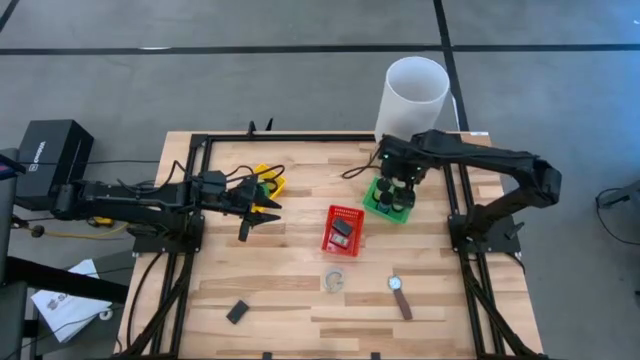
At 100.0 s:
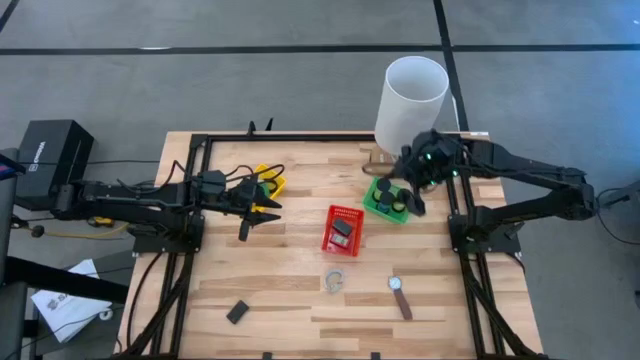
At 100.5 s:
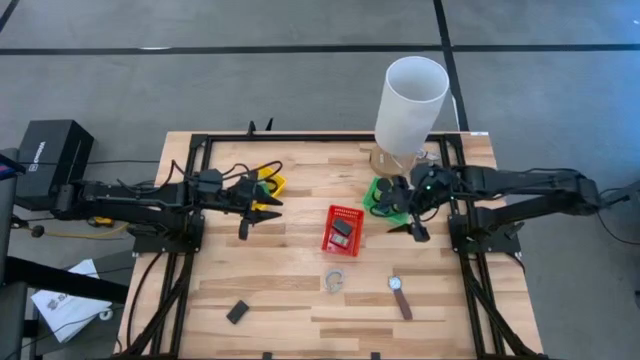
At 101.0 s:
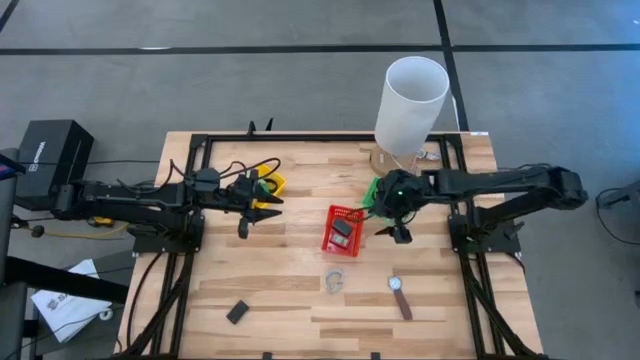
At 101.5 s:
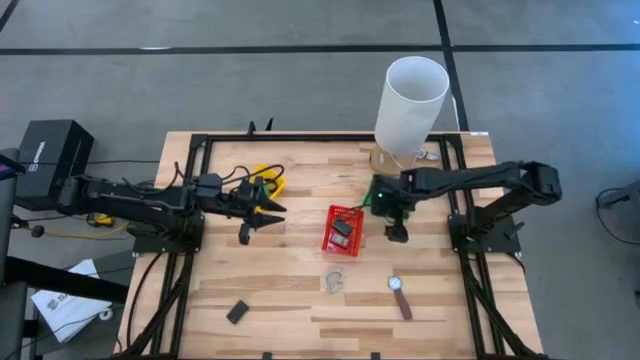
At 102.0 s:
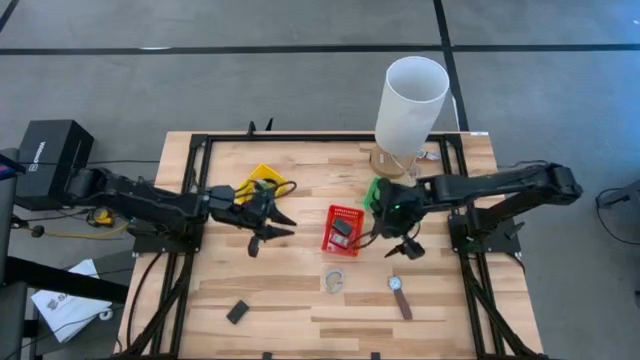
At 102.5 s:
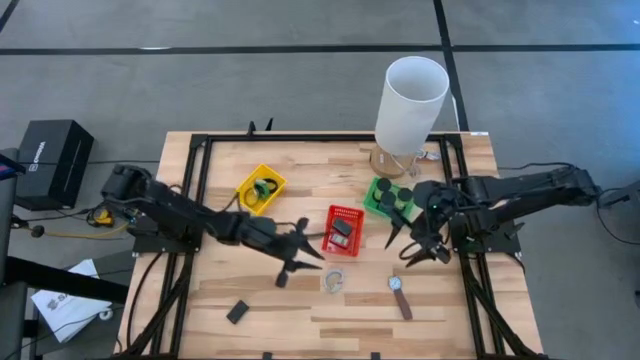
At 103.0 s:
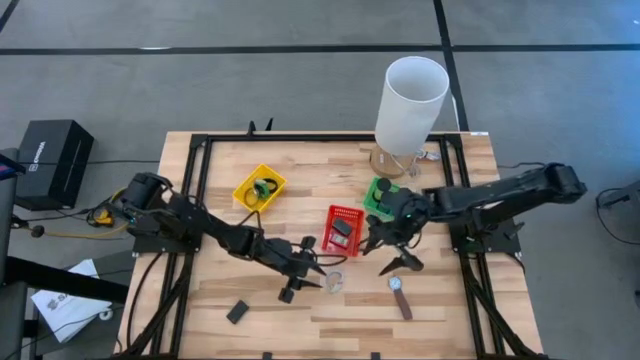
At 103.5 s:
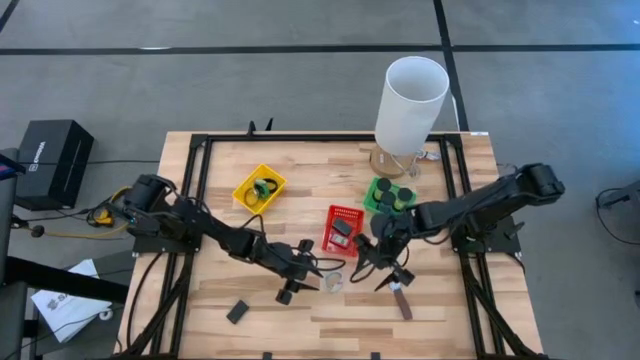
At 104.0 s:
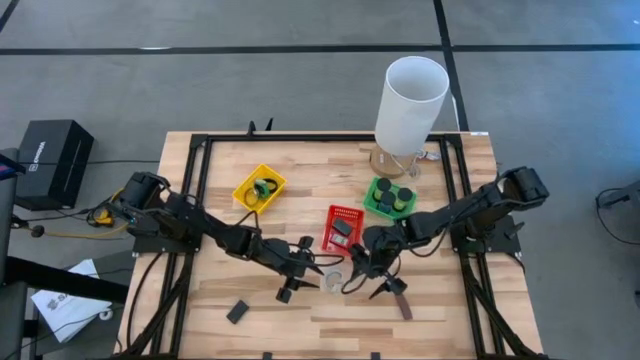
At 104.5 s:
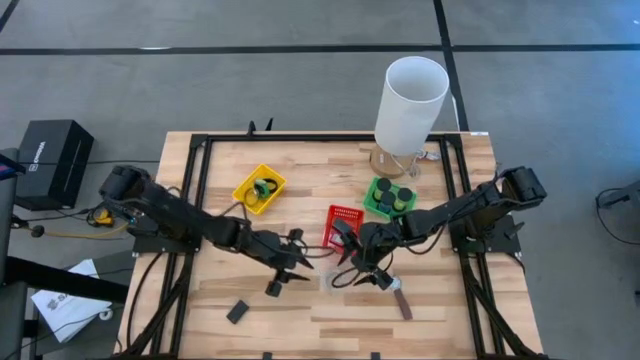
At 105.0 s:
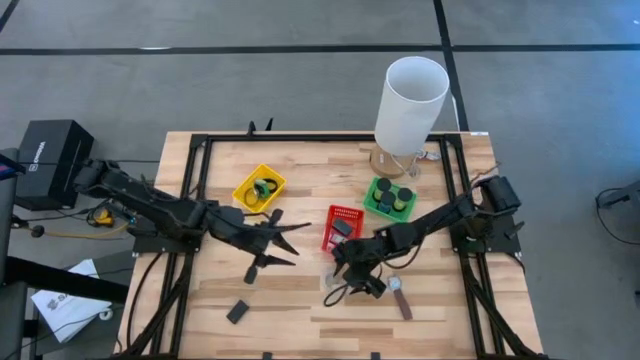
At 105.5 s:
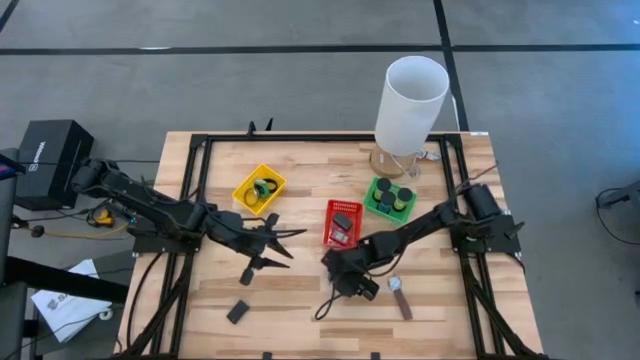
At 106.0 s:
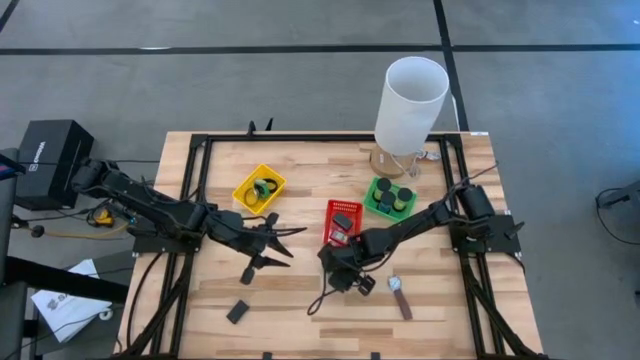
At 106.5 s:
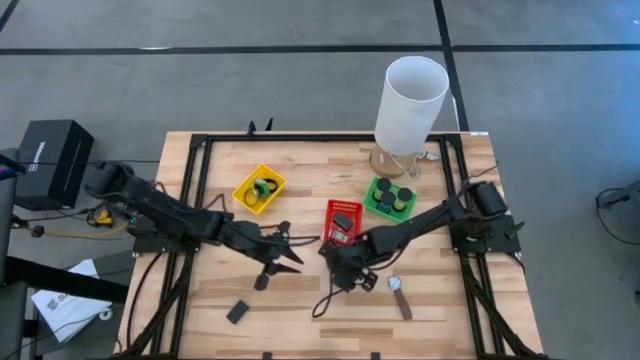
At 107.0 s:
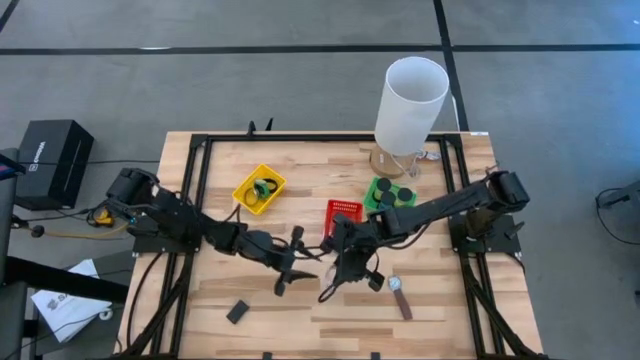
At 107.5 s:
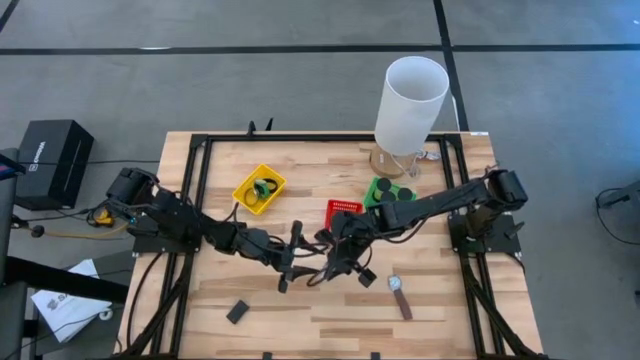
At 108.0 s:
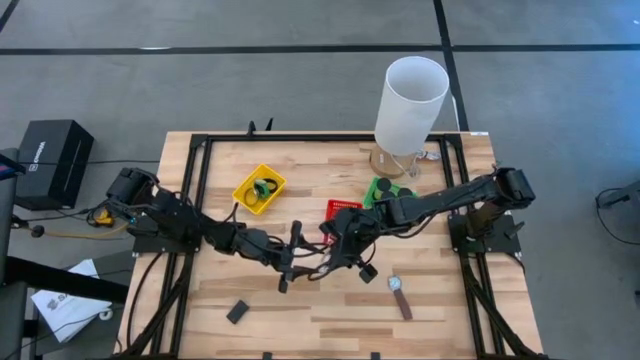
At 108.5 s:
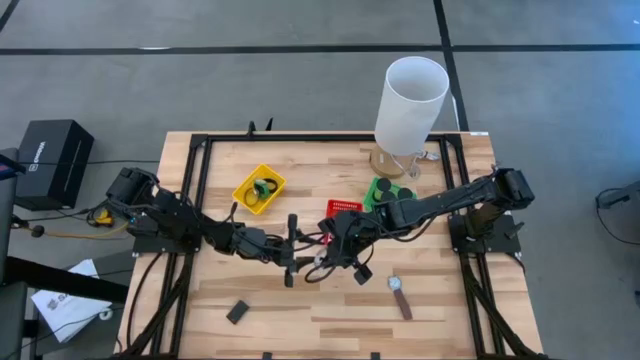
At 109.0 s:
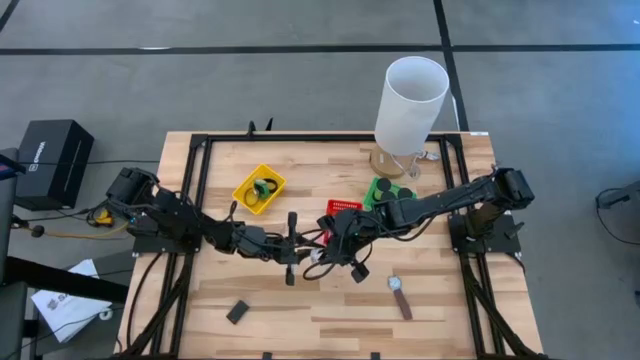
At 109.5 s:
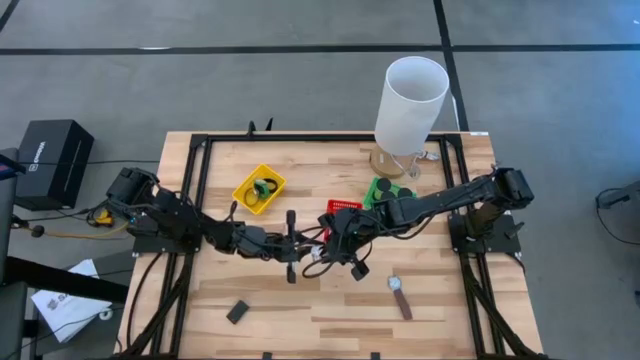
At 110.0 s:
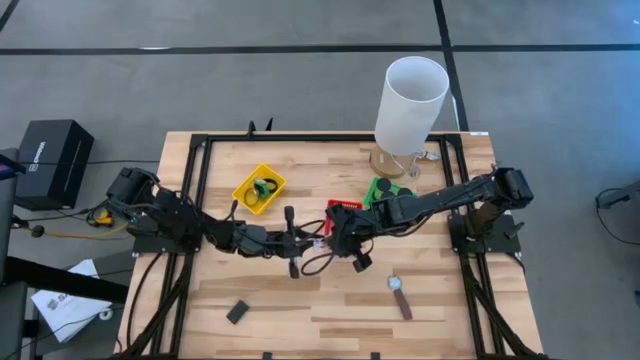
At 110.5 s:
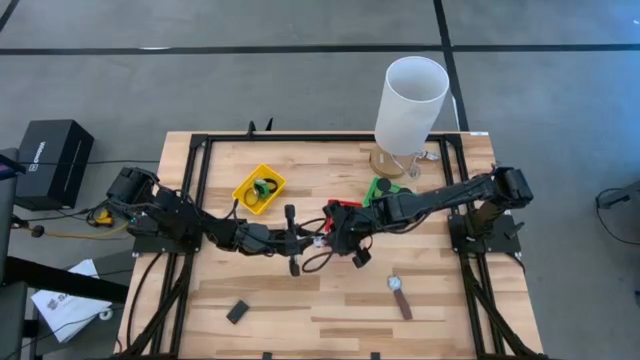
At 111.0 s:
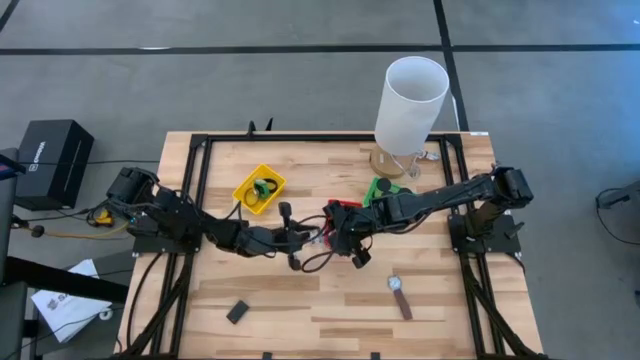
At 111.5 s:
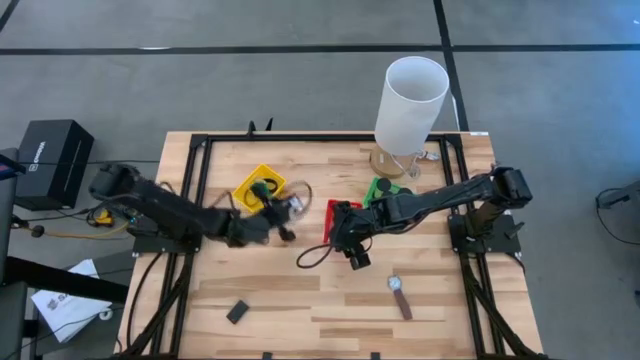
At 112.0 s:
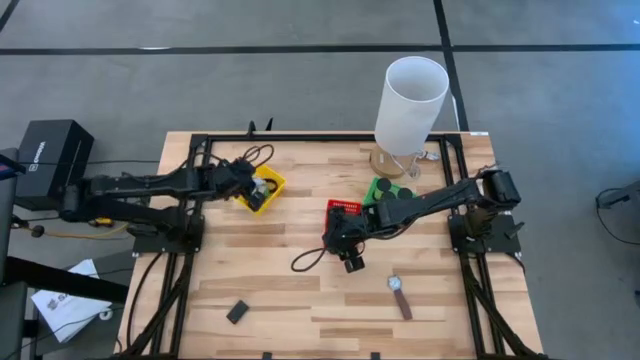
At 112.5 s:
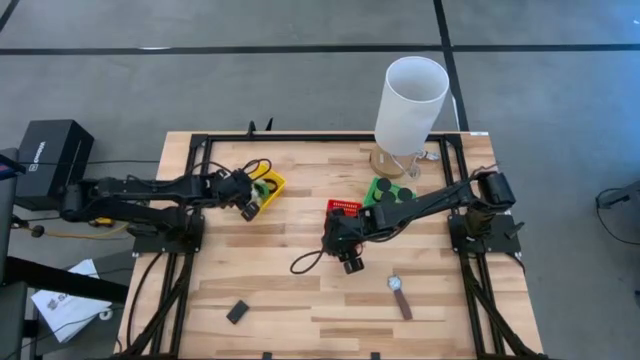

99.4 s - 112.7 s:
Task: Pick & Place Office items
Put the white wristwatch into the yellow bin

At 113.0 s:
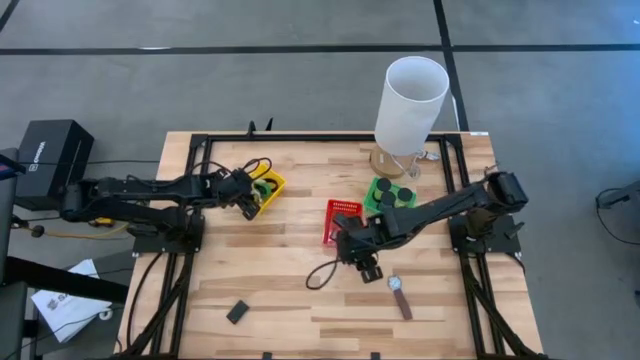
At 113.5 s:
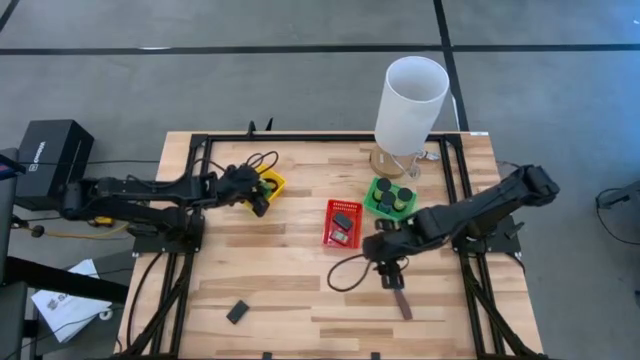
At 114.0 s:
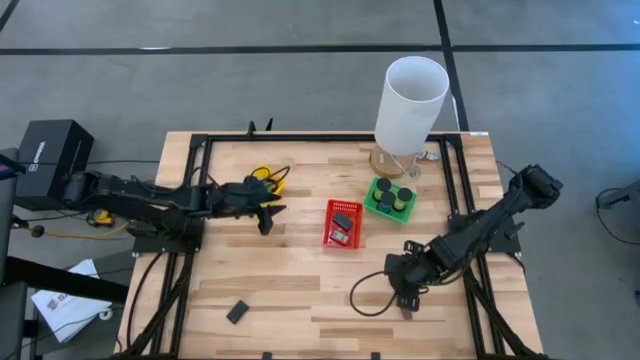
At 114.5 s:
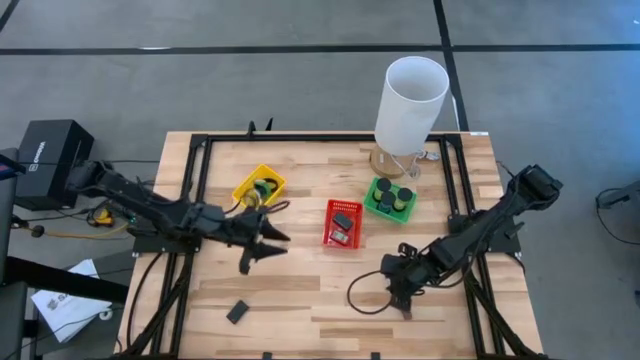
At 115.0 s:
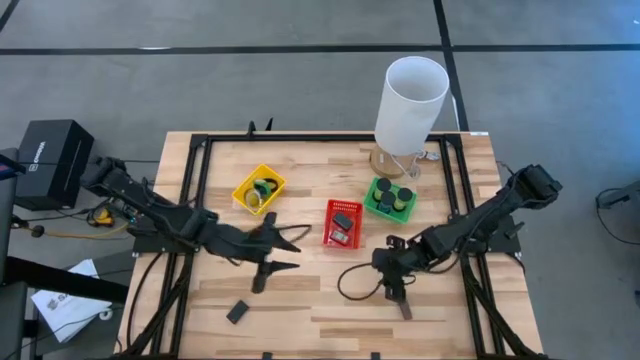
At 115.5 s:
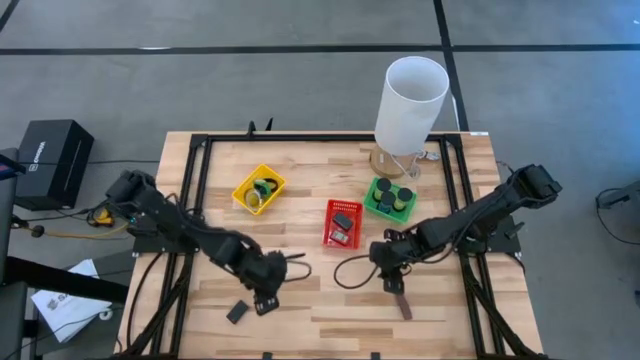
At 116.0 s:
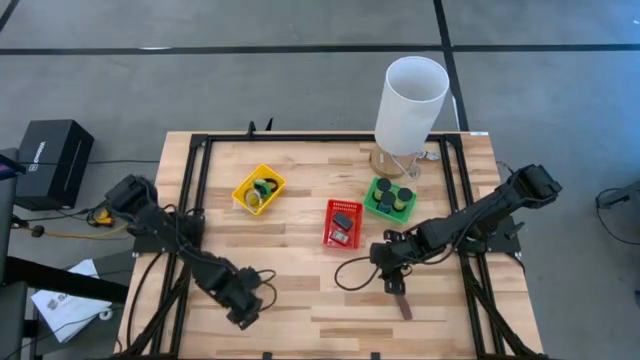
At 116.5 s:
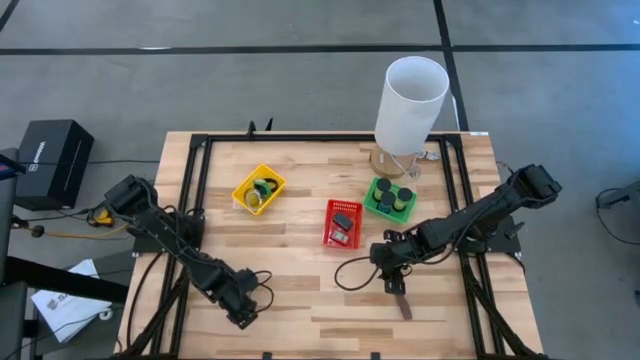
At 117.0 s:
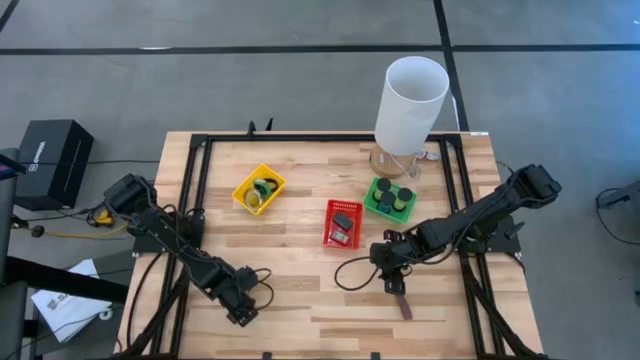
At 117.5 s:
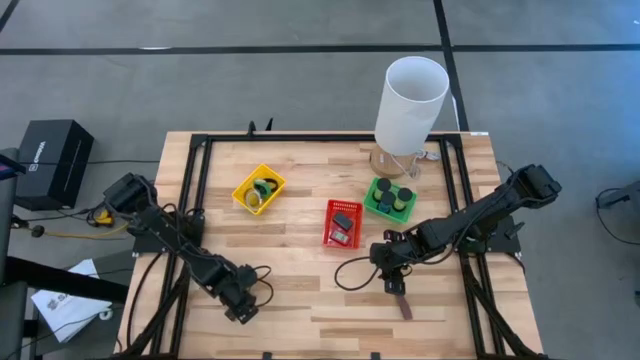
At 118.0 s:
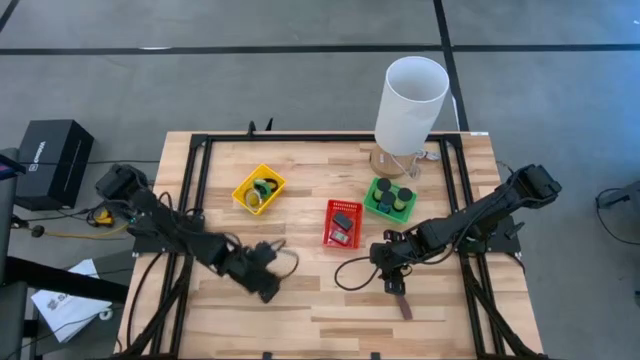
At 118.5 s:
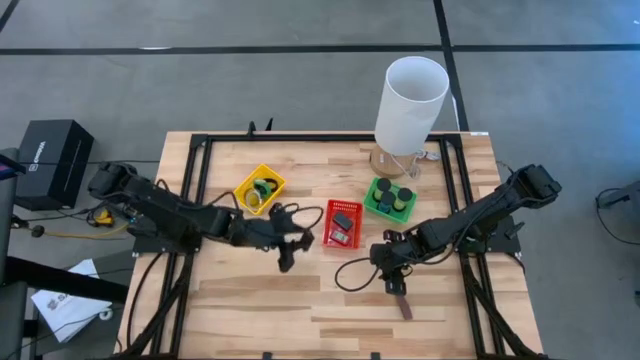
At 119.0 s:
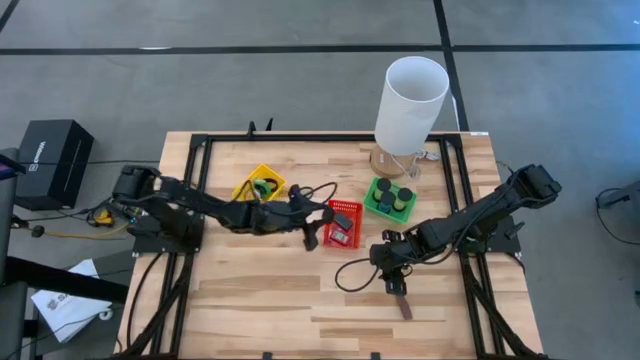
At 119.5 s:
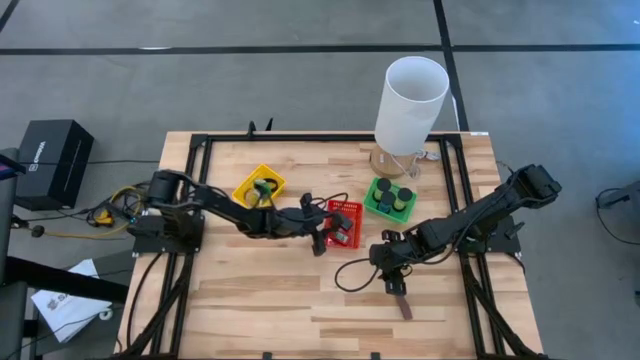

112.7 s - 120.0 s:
Put the black digital clock into the red bin

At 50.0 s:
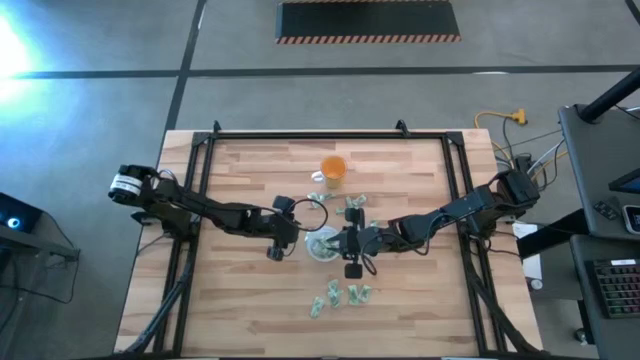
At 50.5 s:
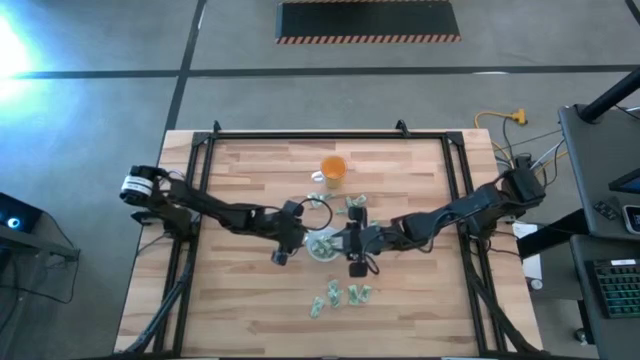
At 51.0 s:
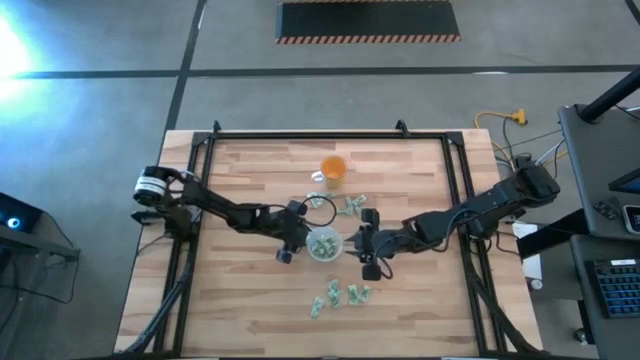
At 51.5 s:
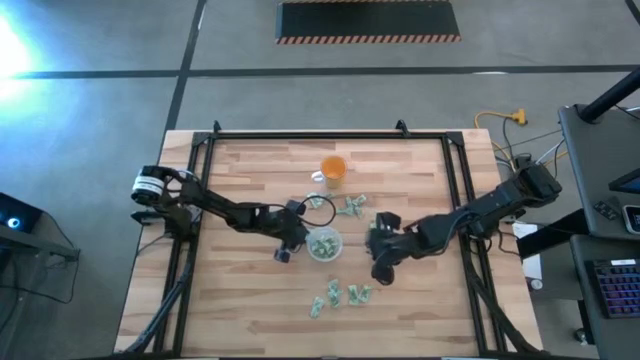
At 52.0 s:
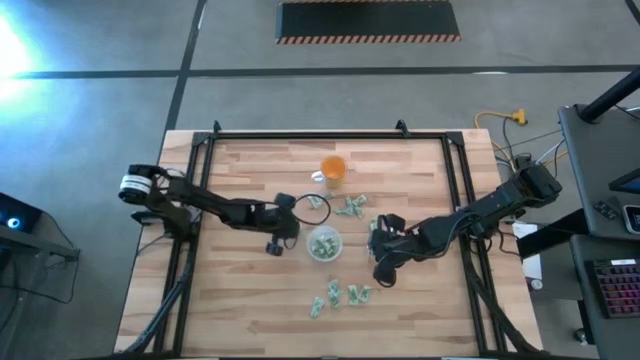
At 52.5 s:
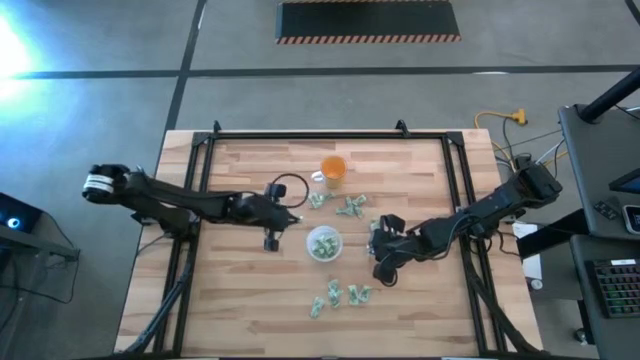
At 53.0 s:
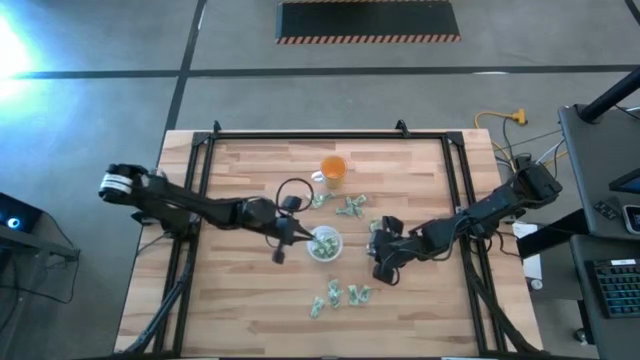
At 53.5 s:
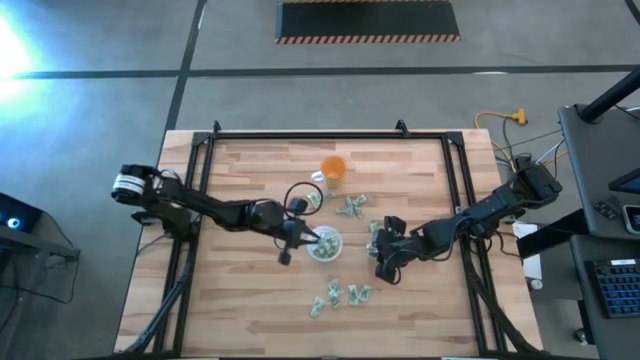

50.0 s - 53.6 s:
Task: Pick and place Stevia / Truvia into bins
Put the green stevia packet into the transparent container
